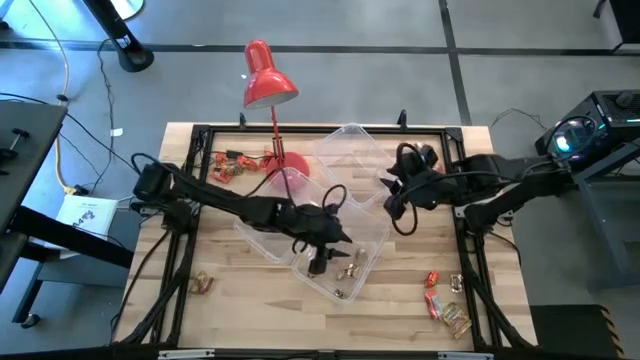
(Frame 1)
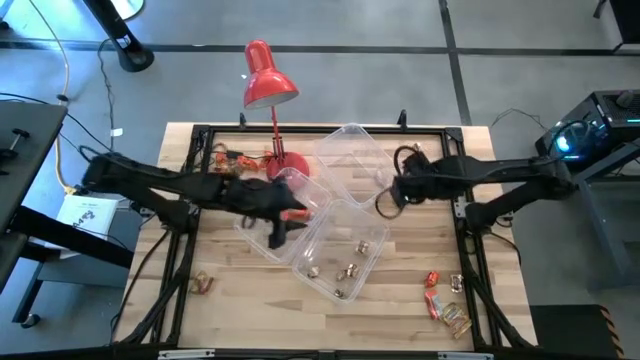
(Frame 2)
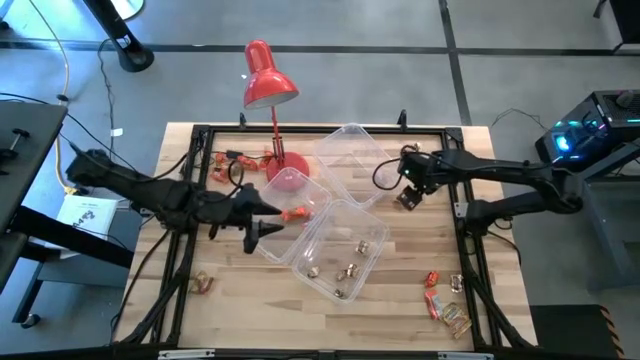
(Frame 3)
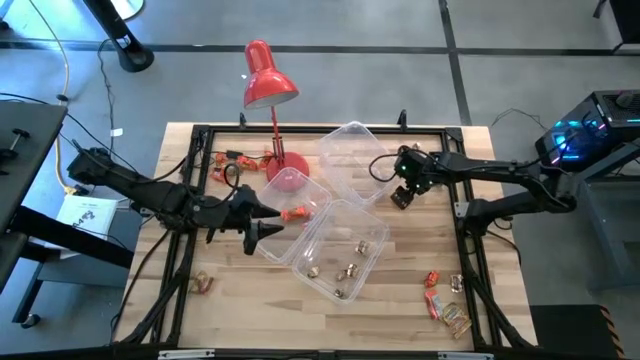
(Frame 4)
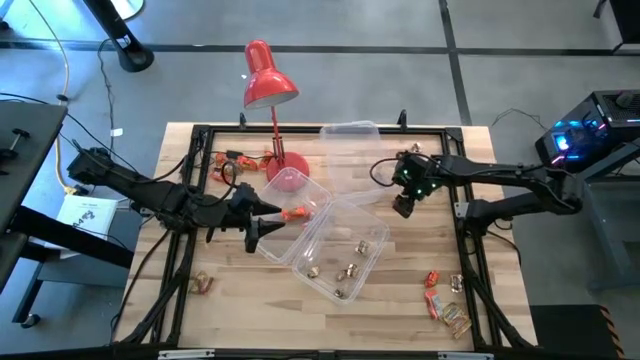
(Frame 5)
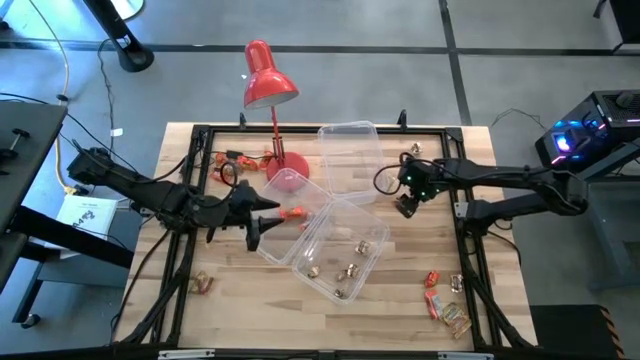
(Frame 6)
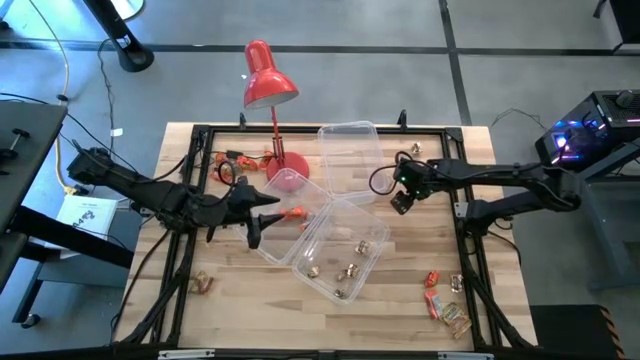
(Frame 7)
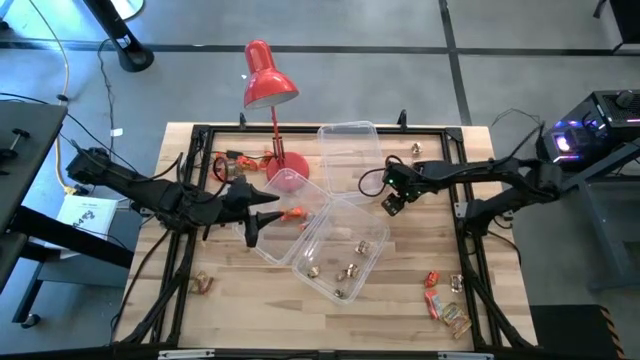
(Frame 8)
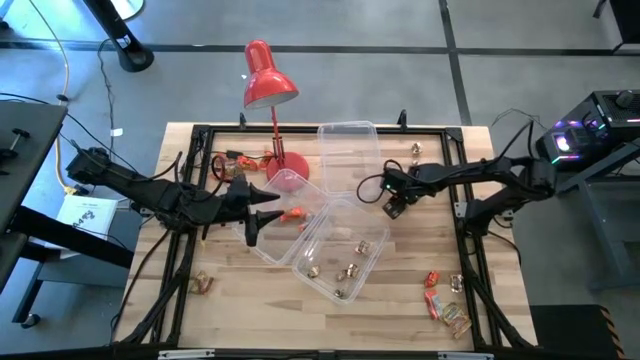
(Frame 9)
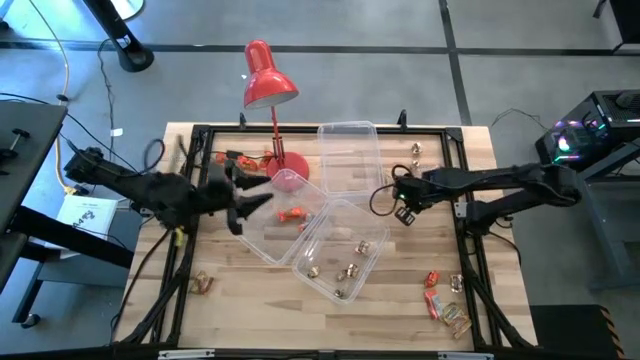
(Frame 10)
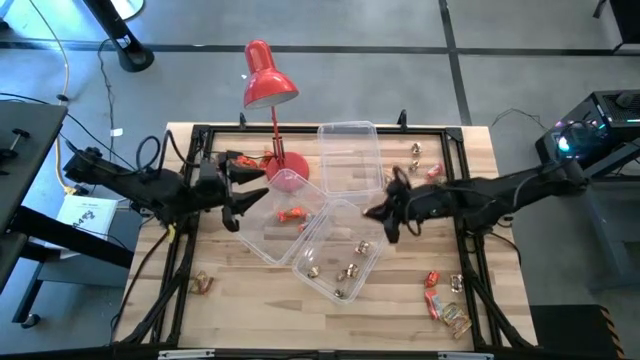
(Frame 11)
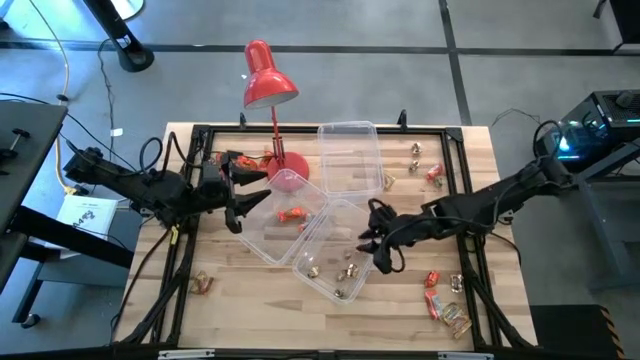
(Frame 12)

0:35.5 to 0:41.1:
Task: Sort candy
Put the gold candy into the bottom left transparent bin

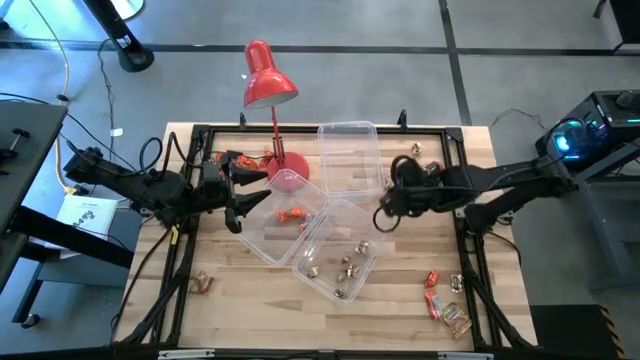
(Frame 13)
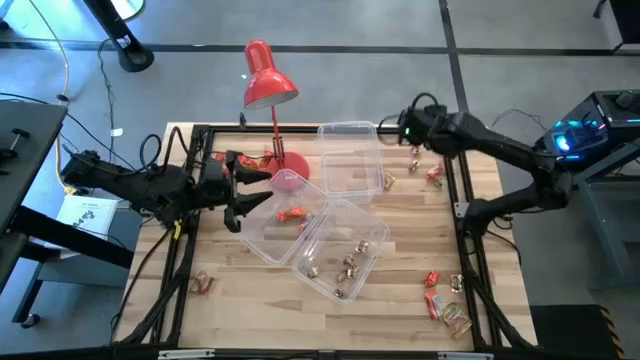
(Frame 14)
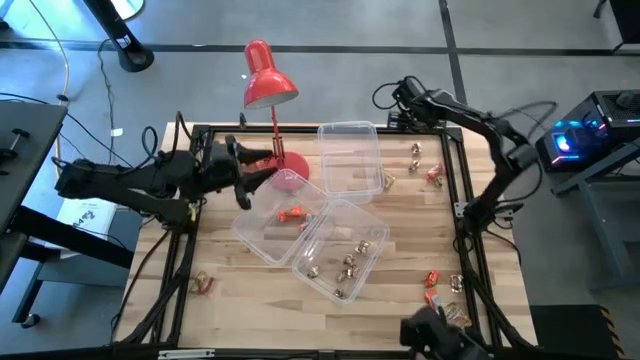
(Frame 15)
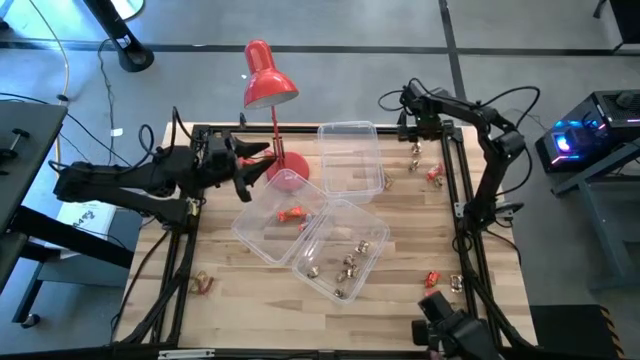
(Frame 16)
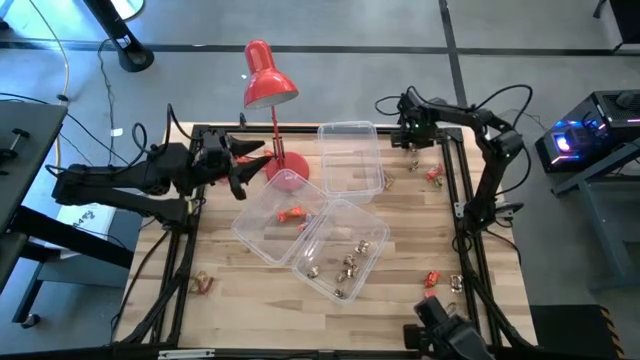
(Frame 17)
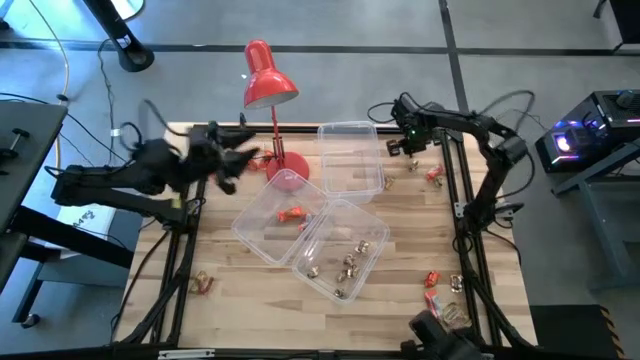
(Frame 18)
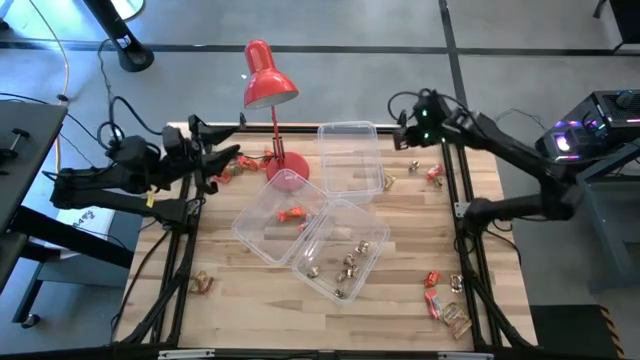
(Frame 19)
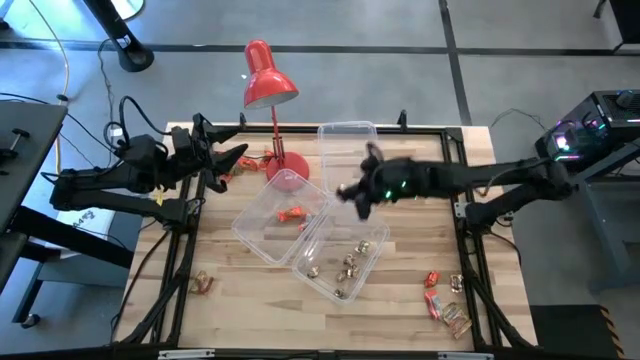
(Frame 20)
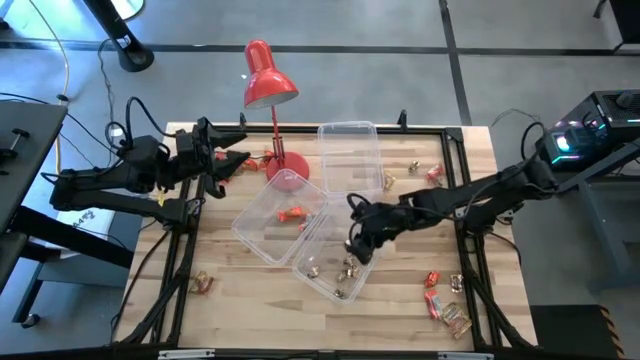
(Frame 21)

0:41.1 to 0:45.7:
Put the gold candy into the bottom left transparent bin

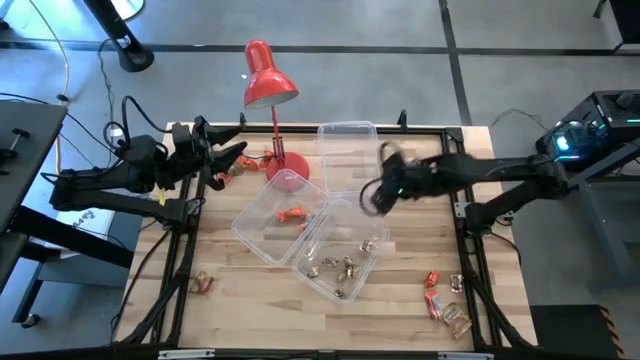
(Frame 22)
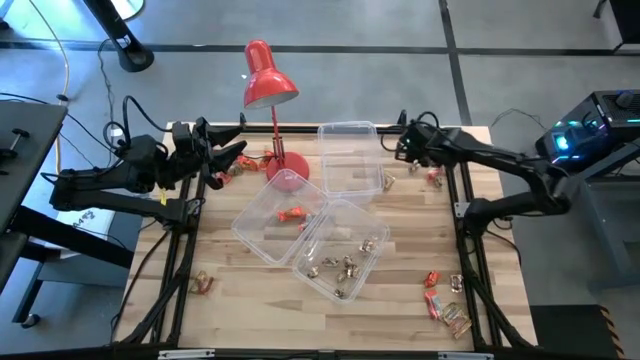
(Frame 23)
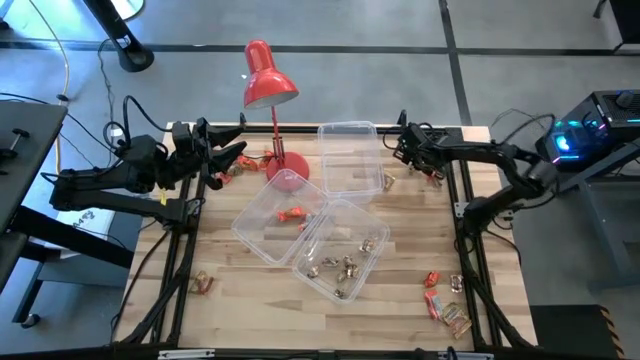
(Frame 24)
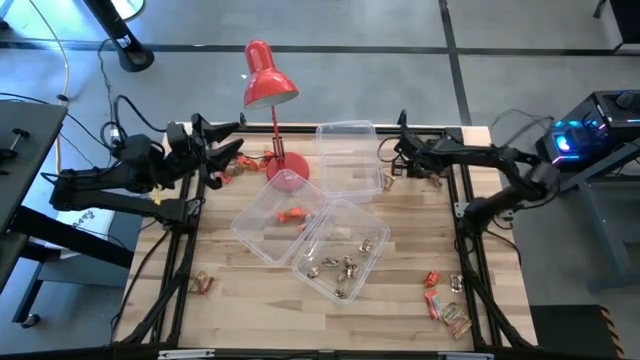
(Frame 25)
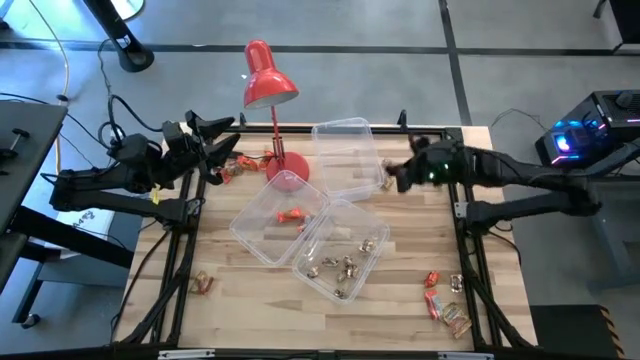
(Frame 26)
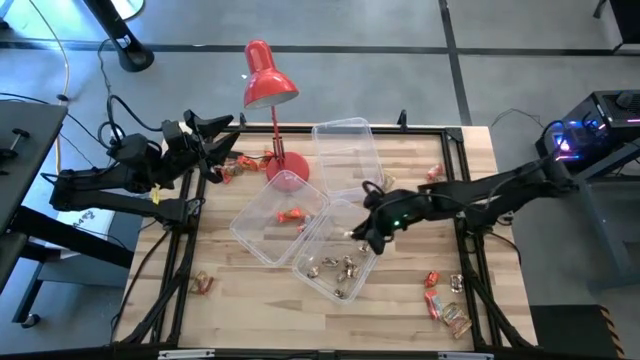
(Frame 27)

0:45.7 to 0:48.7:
Put the brown candy into the bottom right transparent bin

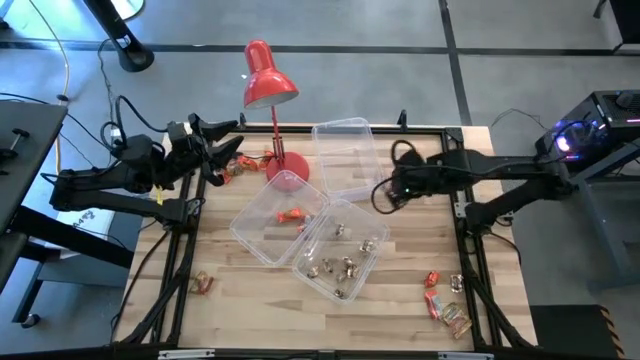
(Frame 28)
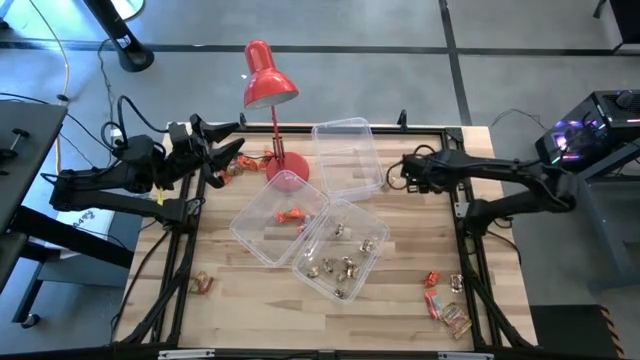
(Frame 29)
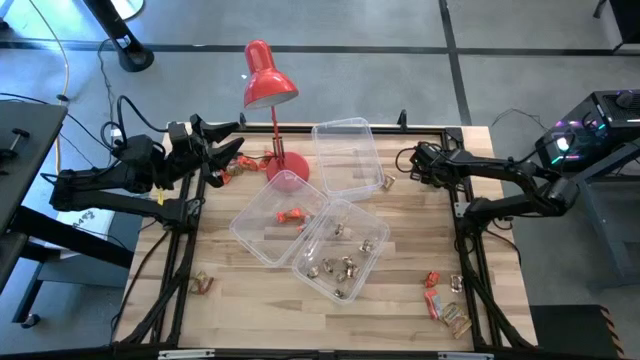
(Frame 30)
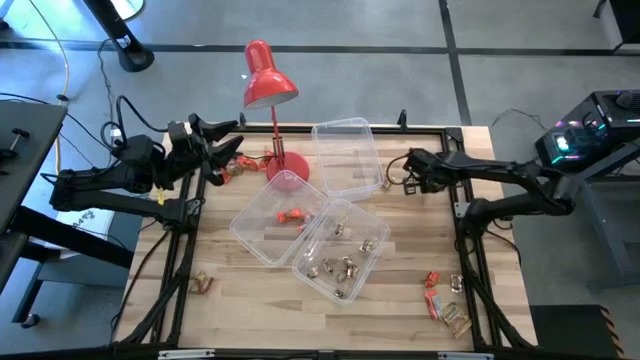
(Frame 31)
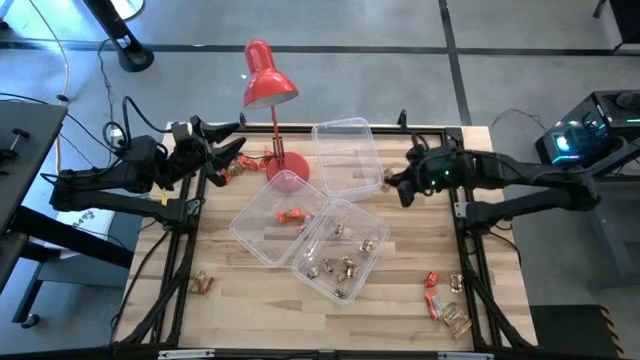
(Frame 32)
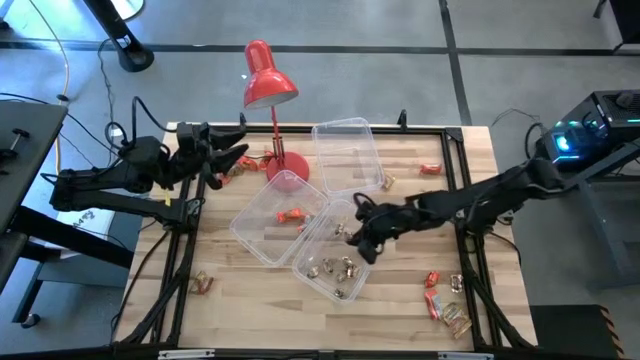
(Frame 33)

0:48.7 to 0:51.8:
Put the gold candy into the bottom left transparent bin

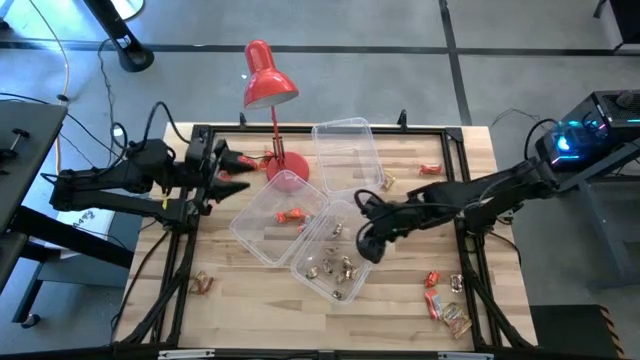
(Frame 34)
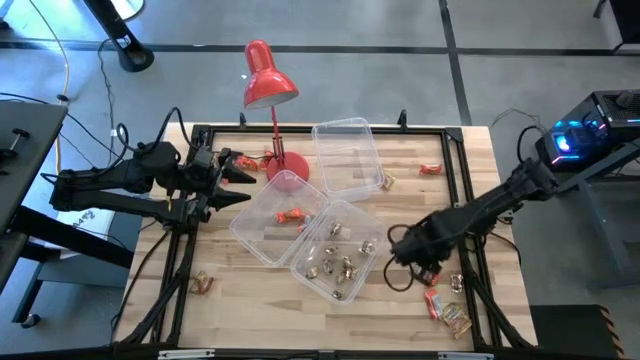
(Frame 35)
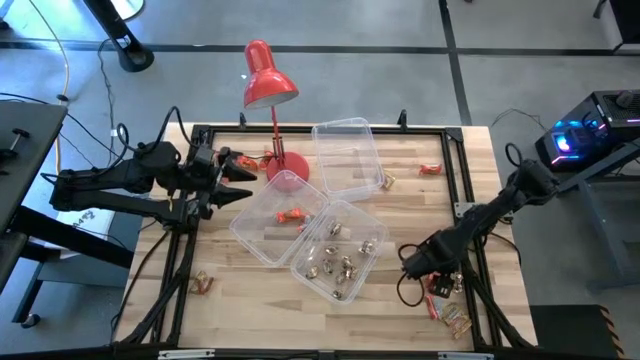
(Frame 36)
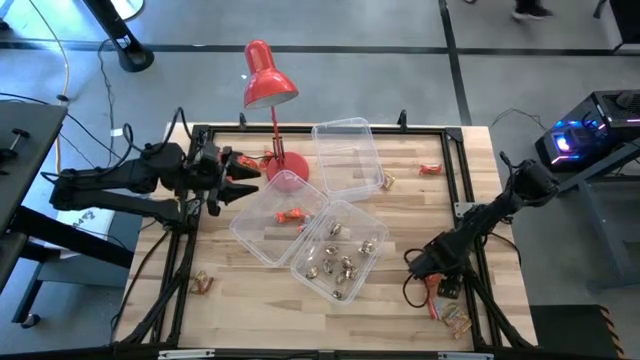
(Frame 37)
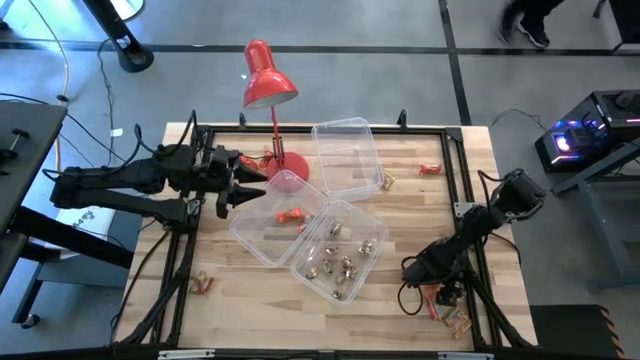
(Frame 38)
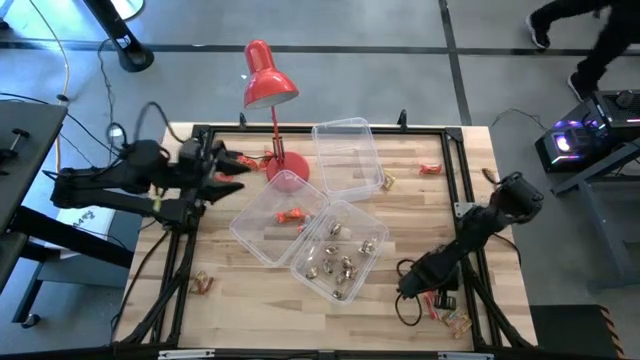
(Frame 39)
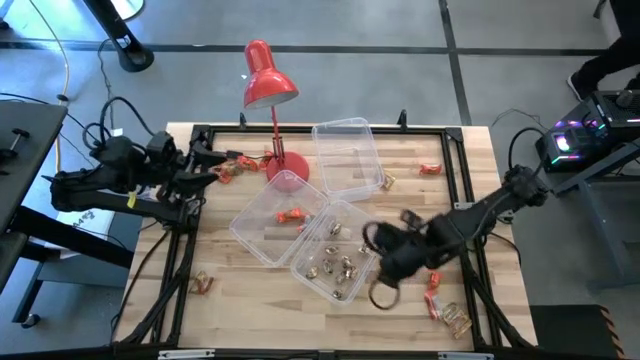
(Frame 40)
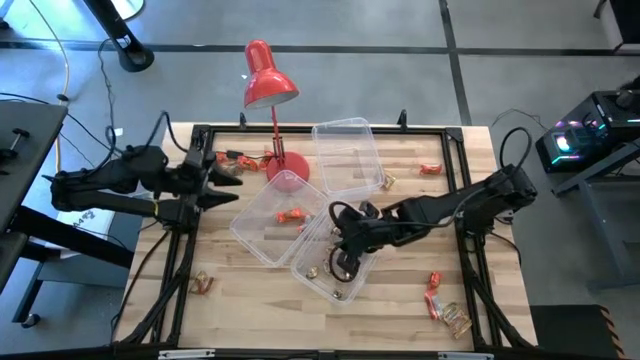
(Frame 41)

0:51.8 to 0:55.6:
Put the gold candy into the bottom left transparent bin

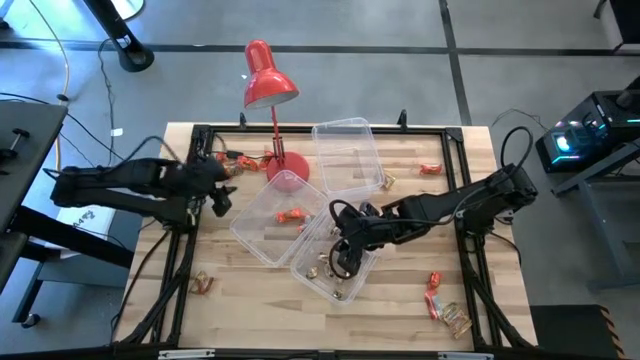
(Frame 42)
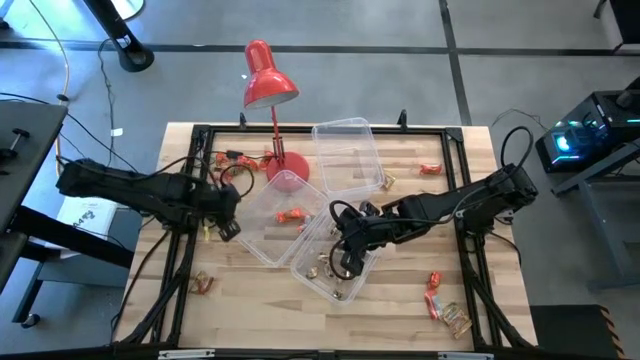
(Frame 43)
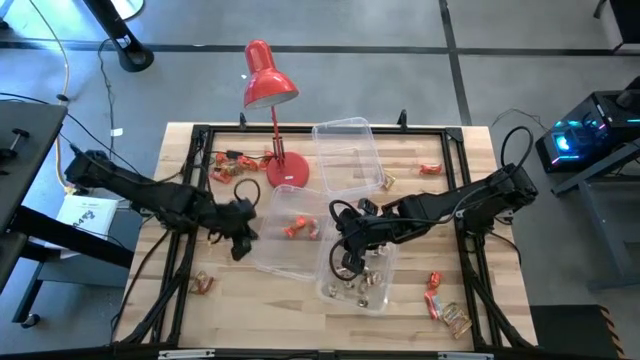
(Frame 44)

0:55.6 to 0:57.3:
Adjust the bottom left transparent bin
